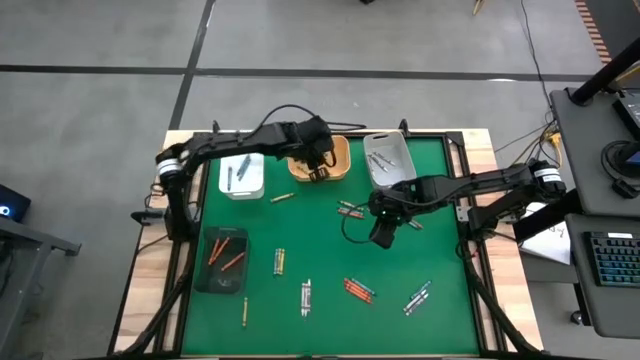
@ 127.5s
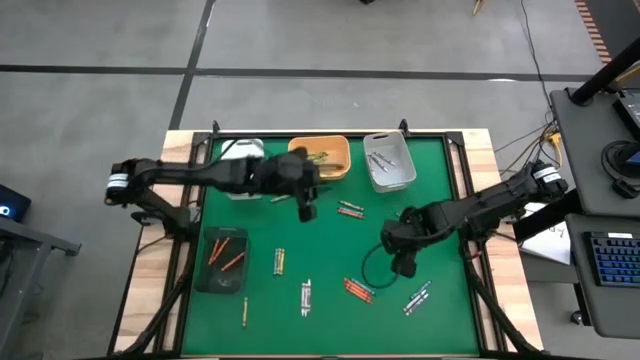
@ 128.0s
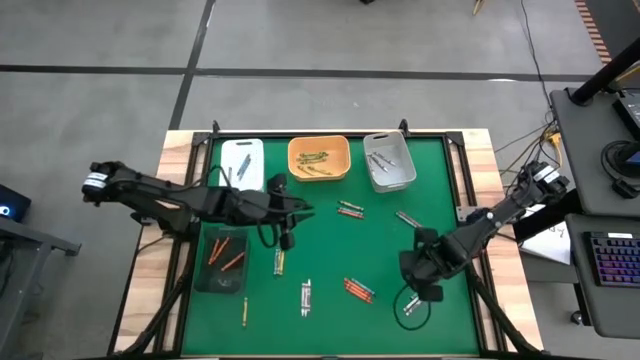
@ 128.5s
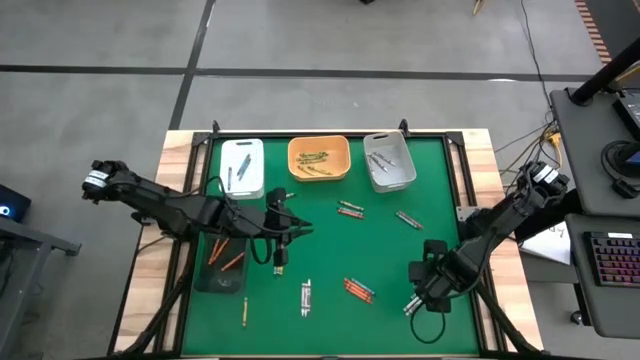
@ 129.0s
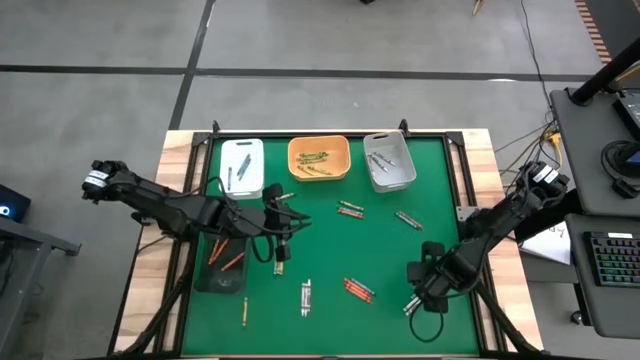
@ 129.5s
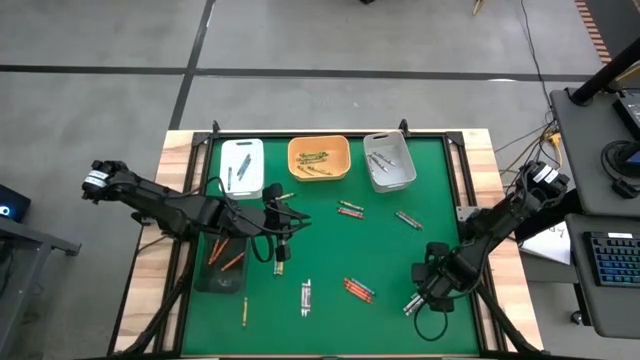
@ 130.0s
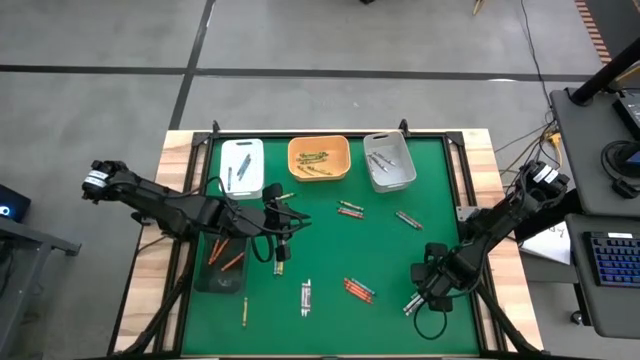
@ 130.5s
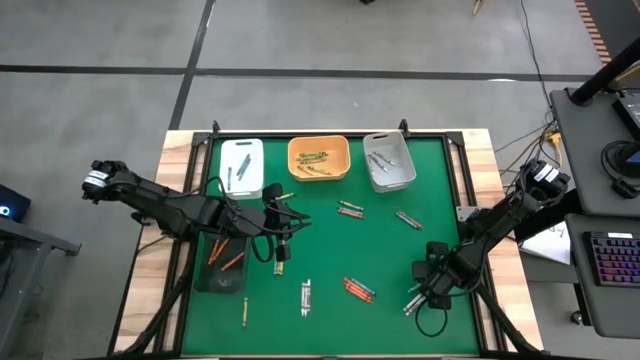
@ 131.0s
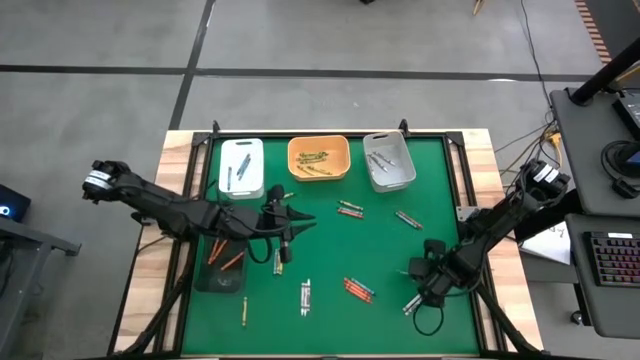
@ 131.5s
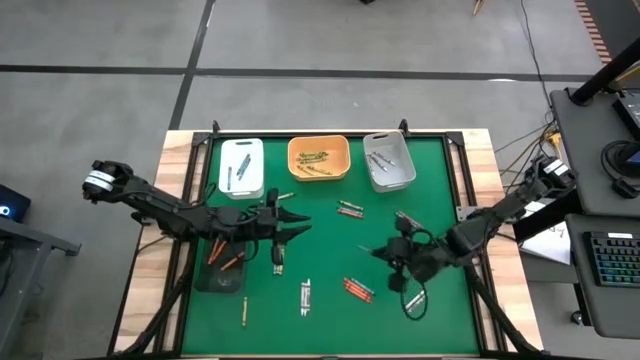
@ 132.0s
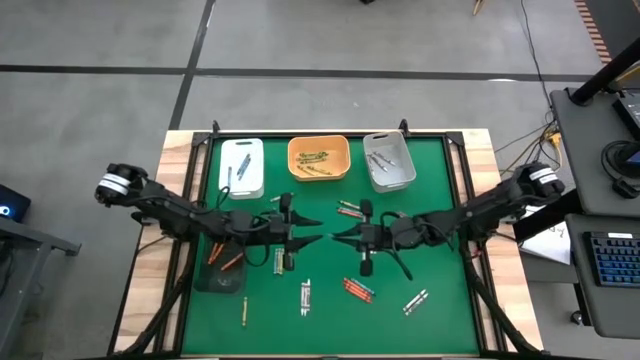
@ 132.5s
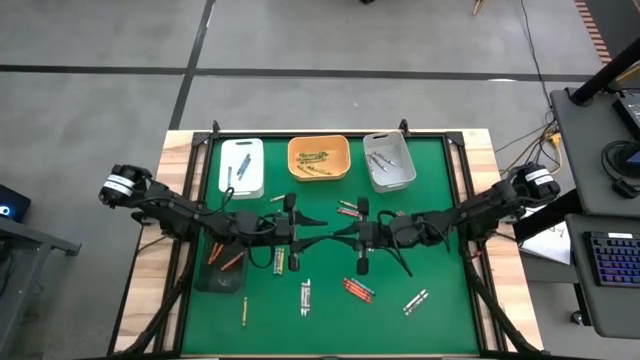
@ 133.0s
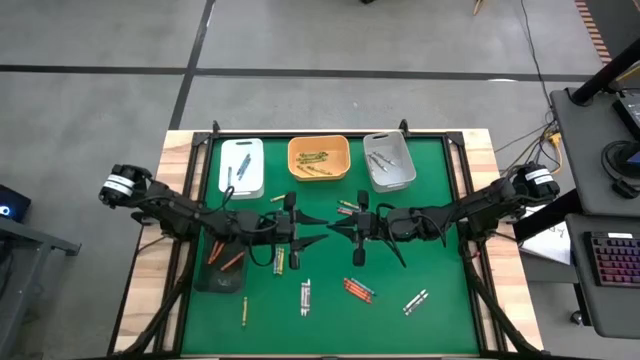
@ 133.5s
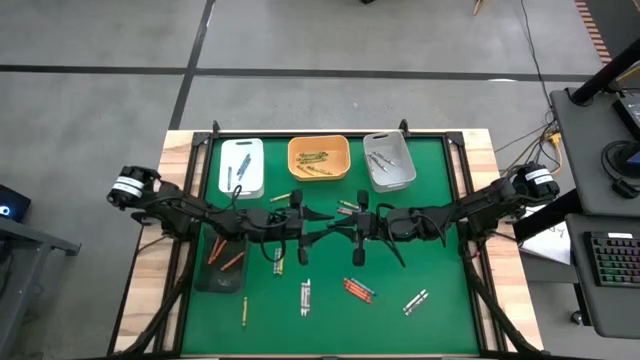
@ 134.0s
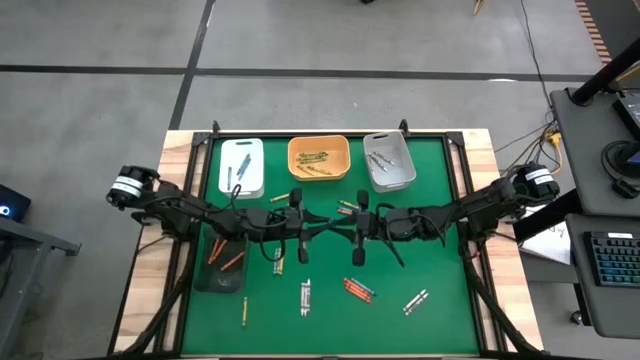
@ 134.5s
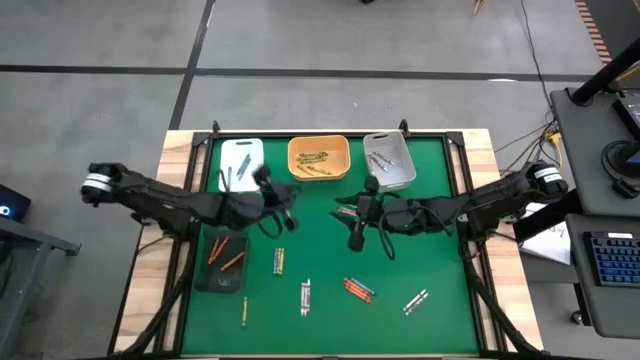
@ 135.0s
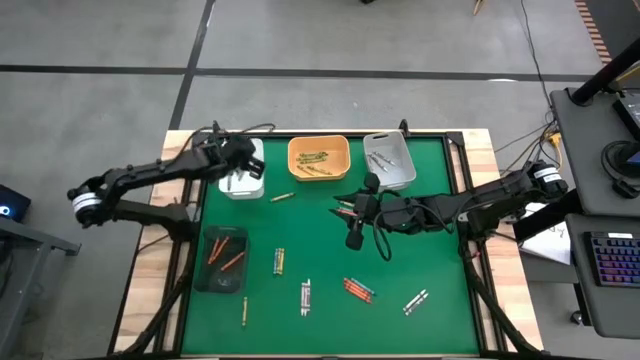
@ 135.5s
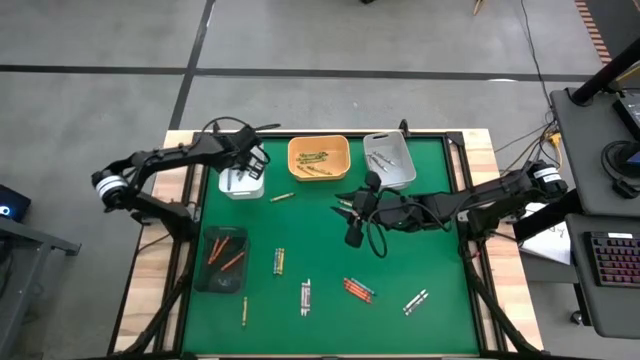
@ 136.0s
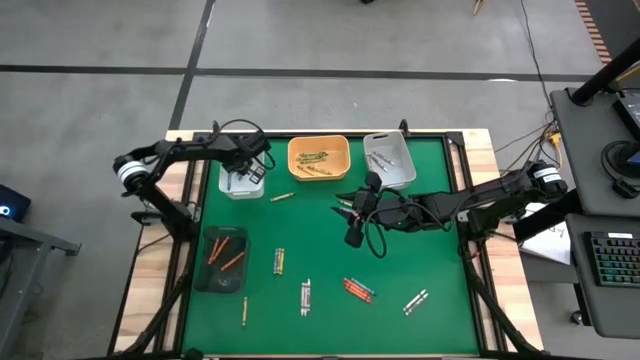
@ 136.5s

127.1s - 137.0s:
Task: Sort crayons
Put the blue crayon into the white bin

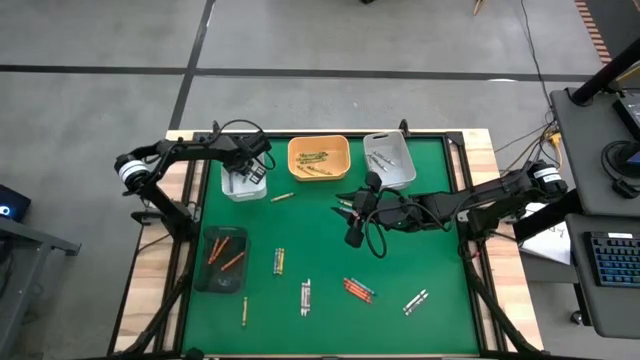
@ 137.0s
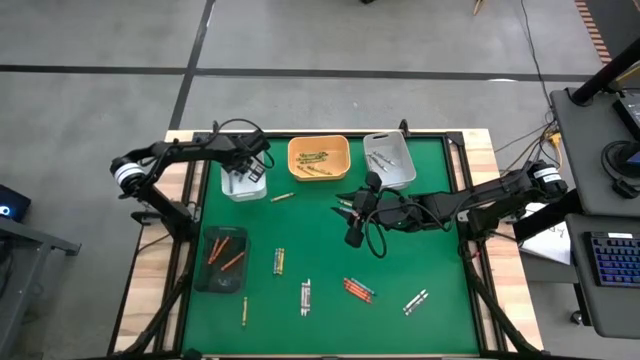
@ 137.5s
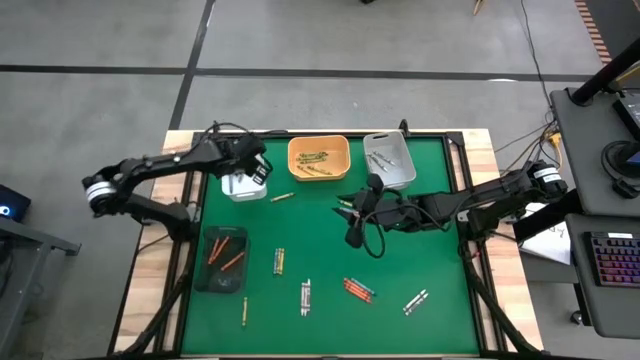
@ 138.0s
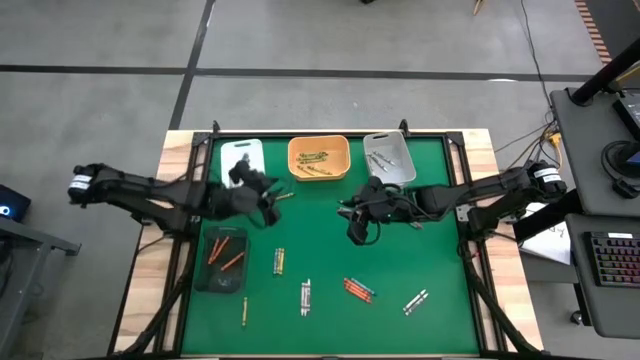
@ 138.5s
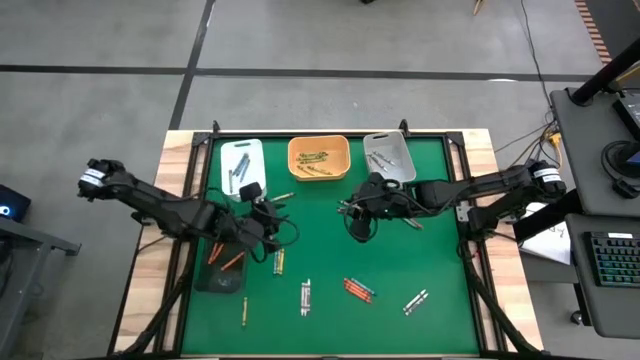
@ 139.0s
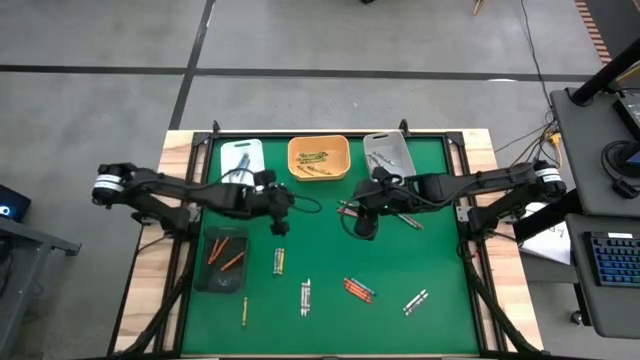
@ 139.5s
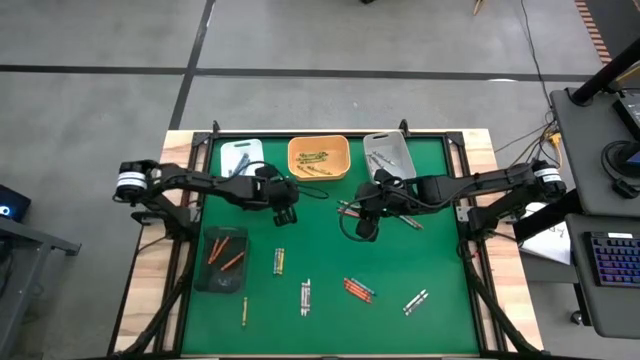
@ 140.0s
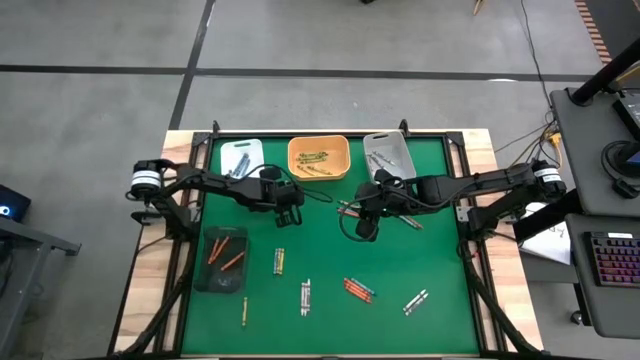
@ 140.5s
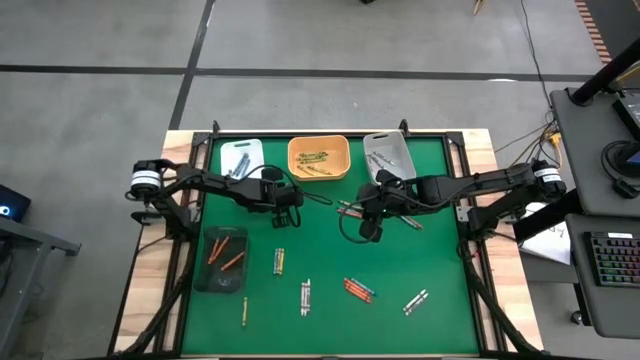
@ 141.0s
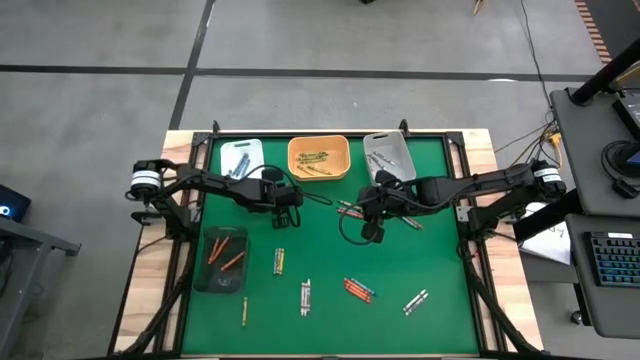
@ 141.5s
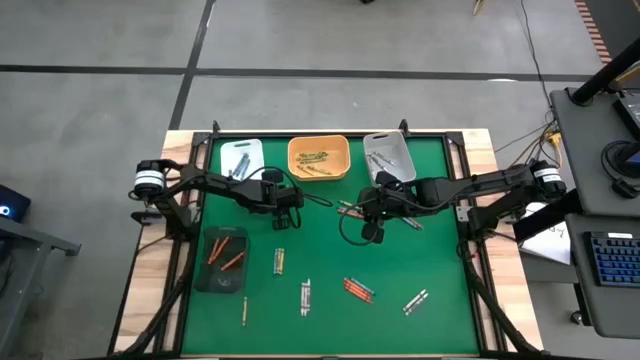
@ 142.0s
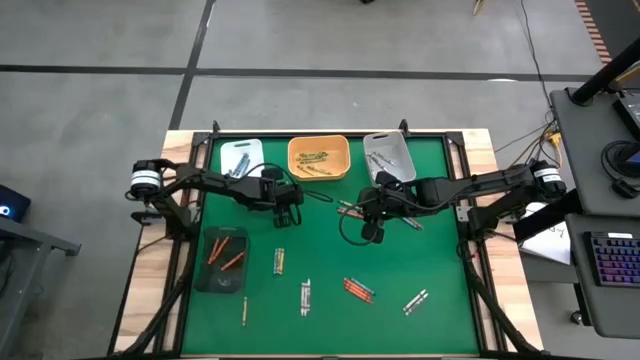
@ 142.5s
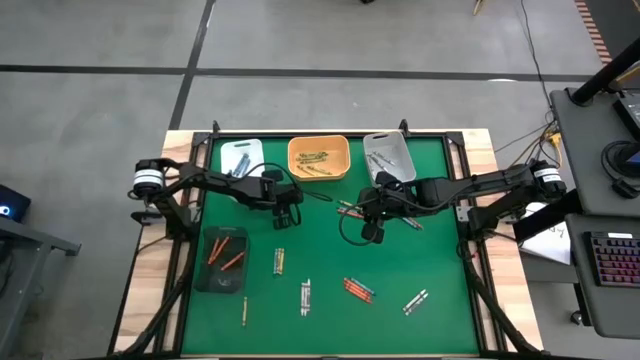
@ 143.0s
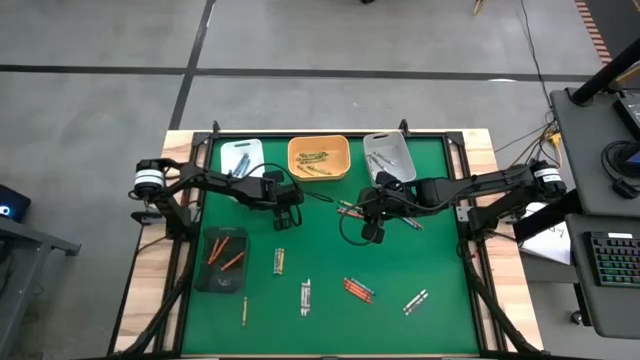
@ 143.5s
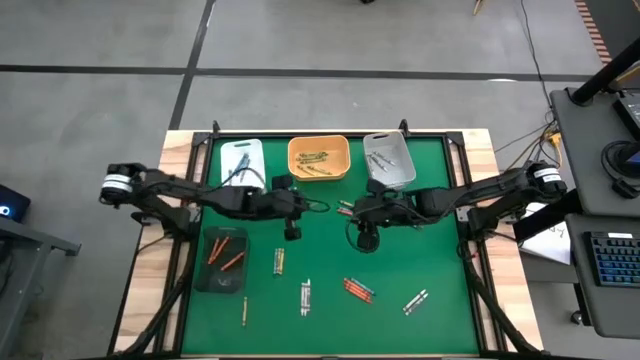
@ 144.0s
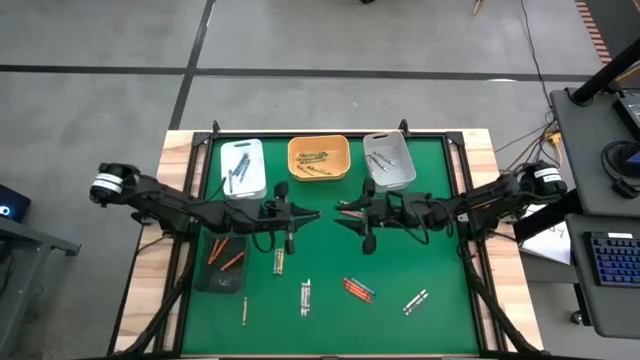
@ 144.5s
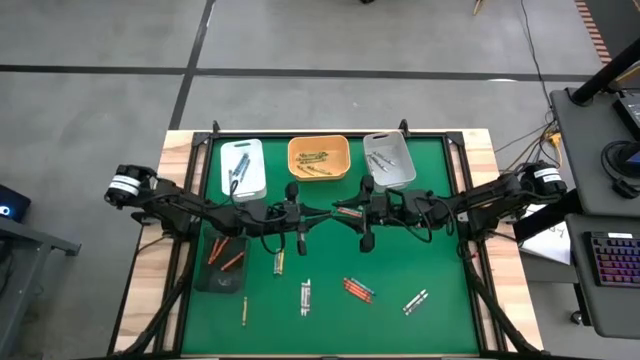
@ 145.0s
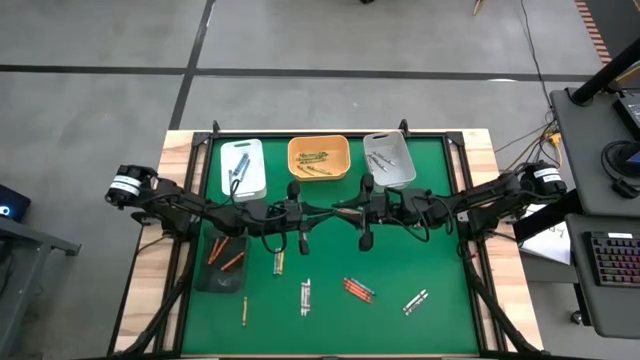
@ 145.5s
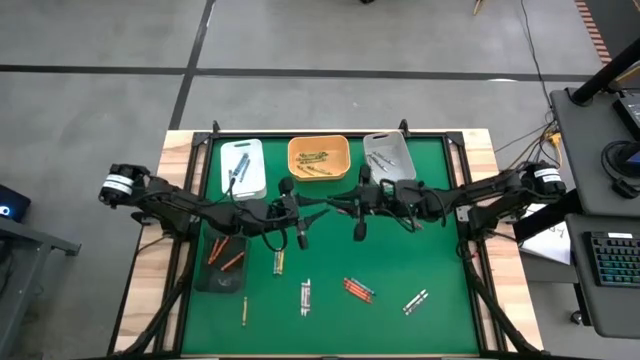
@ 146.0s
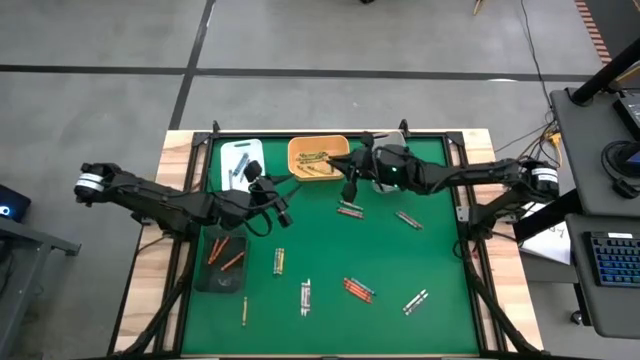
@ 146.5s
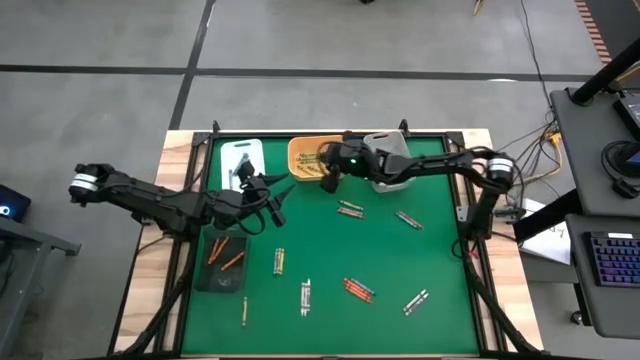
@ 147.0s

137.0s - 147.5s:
Put the green crayon into the yellow bin

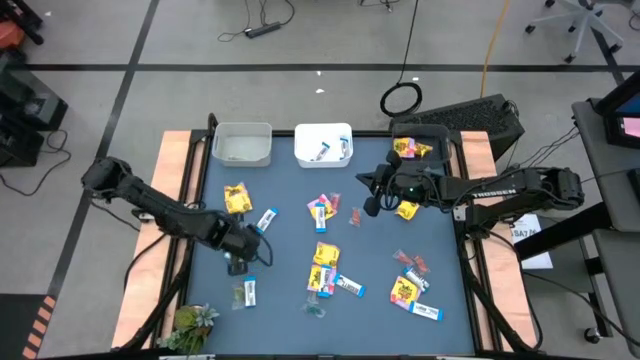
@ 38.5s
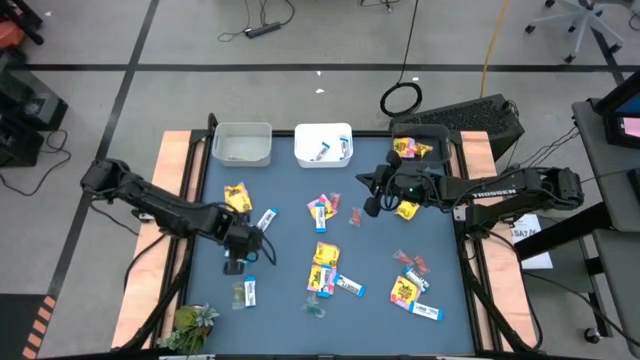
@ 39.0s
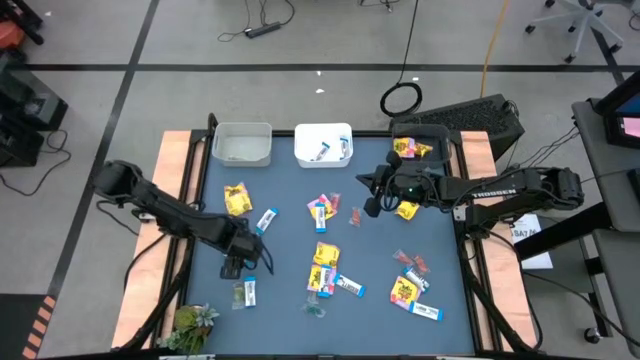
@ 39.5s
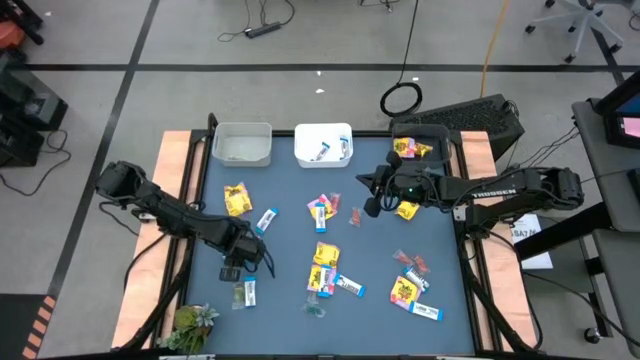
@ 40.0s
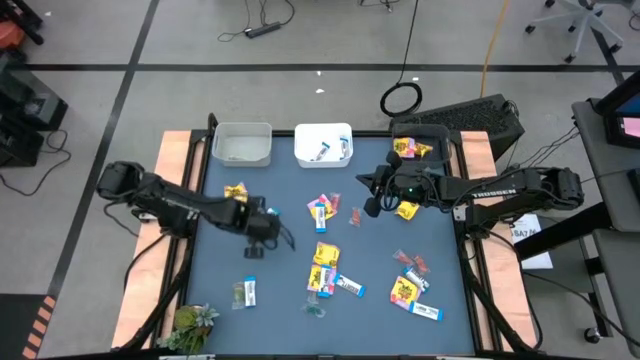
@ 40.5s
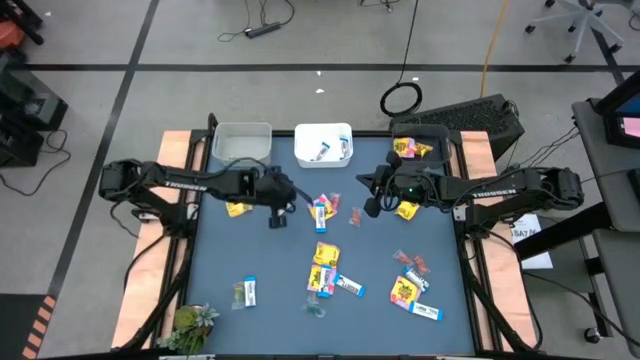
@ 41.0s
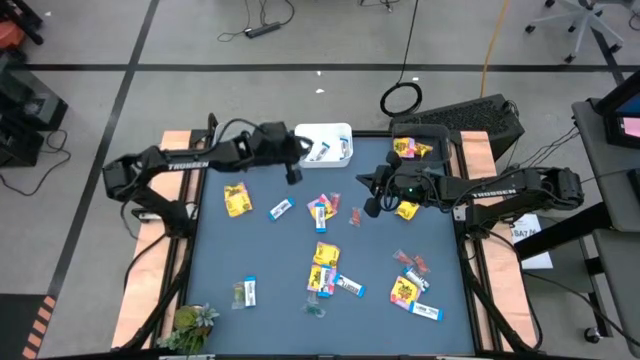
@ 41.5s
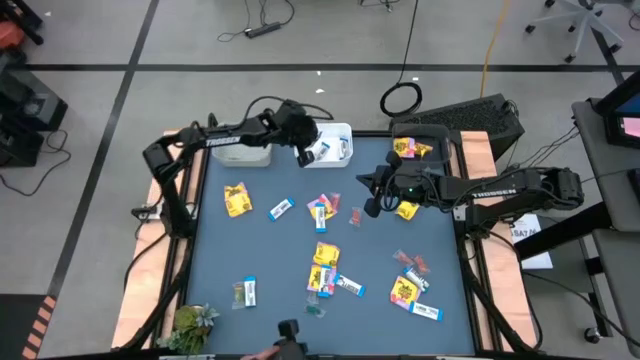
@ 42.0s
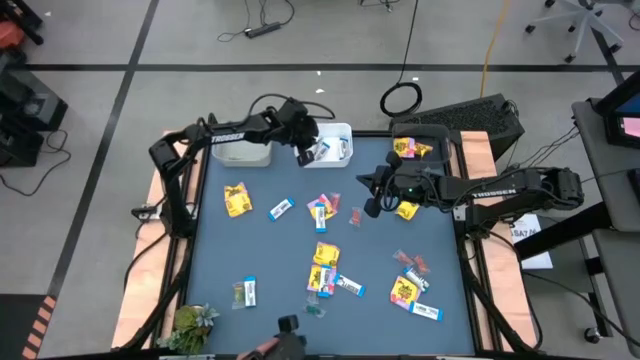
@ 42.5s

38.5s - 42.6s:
Task: Sort candy
Put the white chocolate into the white bin
